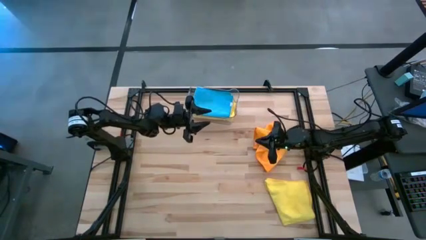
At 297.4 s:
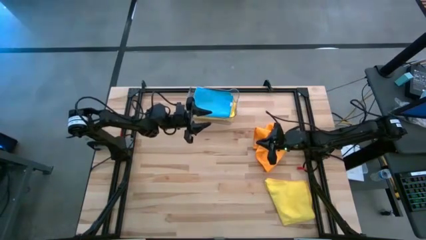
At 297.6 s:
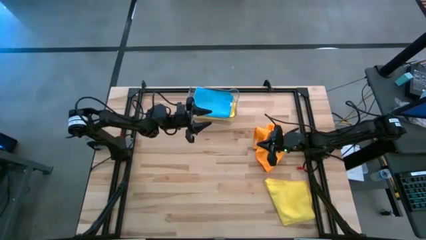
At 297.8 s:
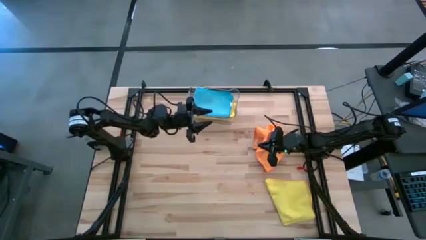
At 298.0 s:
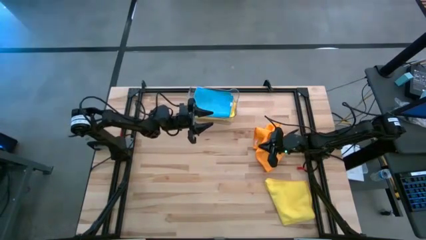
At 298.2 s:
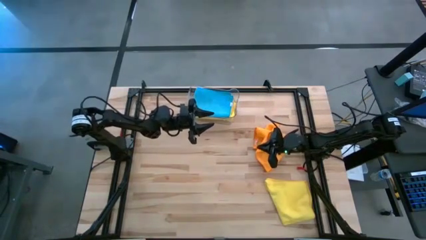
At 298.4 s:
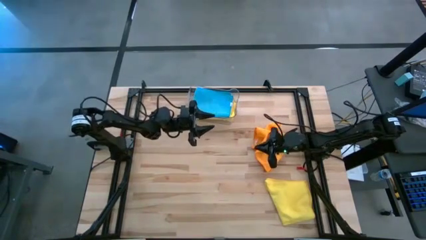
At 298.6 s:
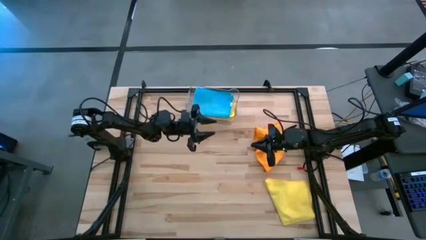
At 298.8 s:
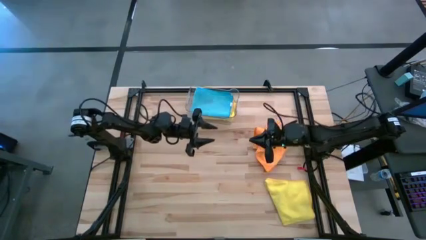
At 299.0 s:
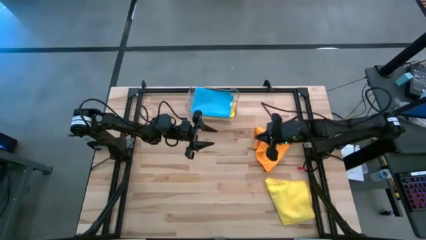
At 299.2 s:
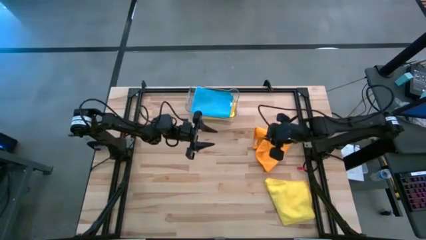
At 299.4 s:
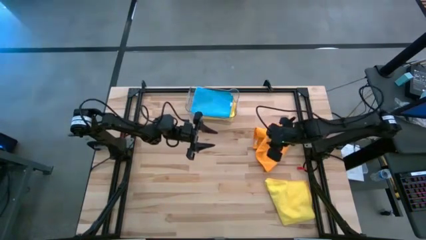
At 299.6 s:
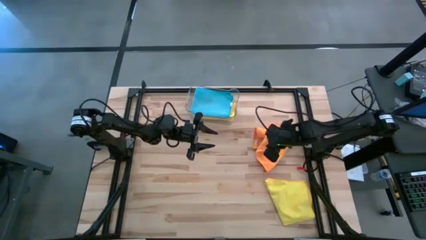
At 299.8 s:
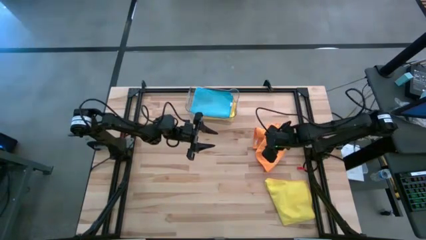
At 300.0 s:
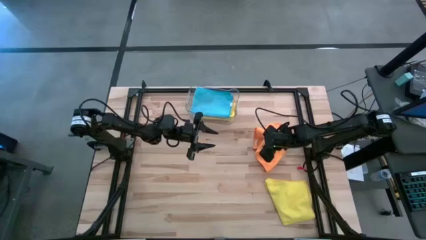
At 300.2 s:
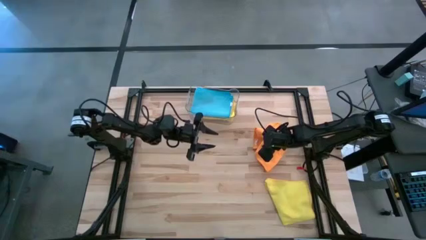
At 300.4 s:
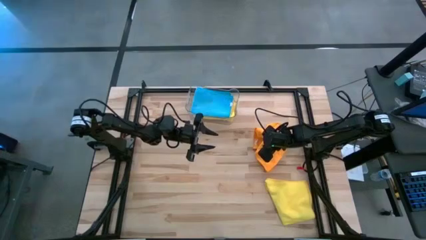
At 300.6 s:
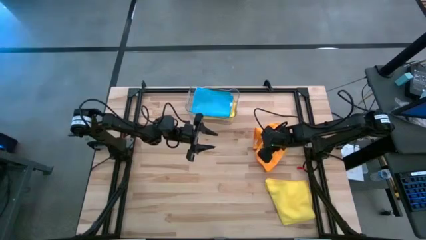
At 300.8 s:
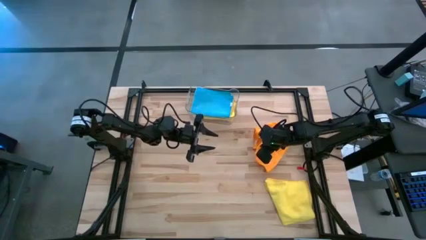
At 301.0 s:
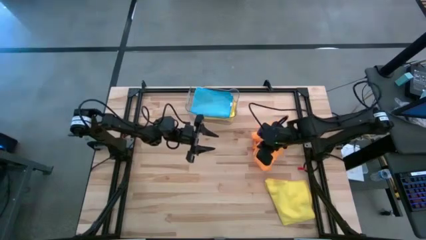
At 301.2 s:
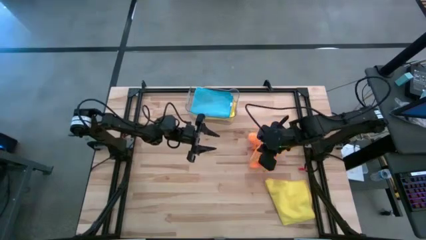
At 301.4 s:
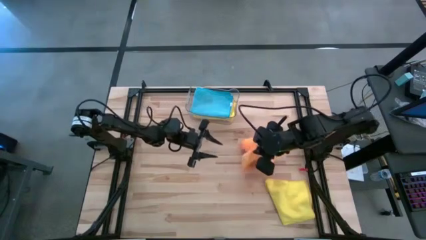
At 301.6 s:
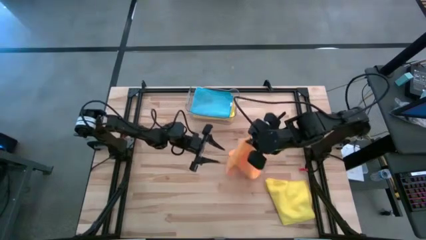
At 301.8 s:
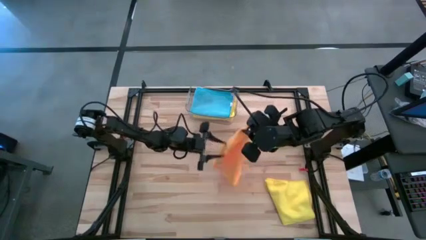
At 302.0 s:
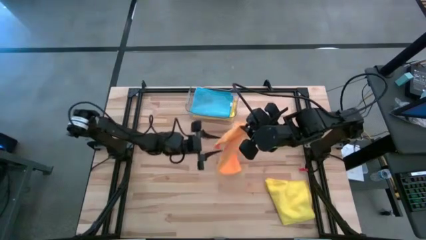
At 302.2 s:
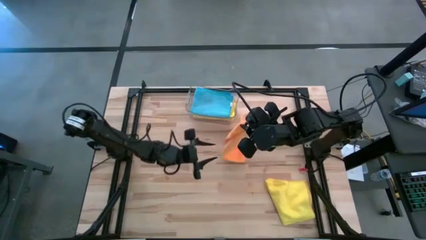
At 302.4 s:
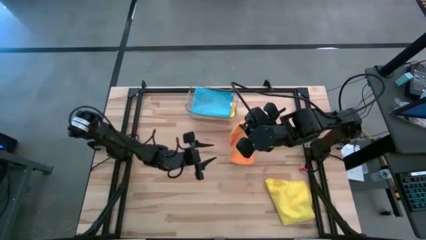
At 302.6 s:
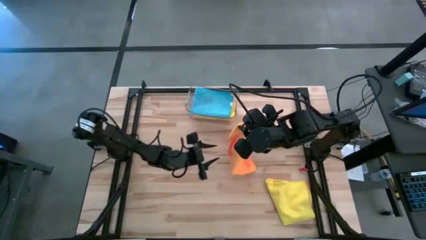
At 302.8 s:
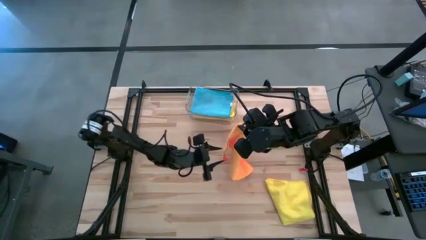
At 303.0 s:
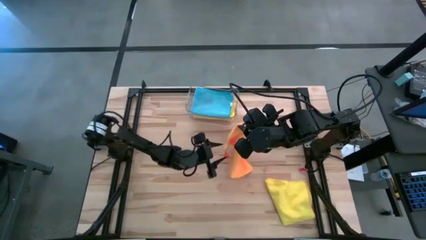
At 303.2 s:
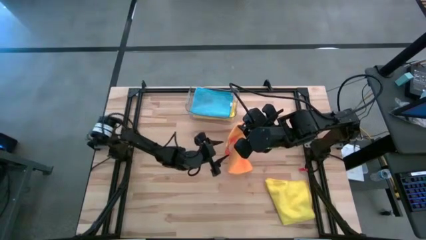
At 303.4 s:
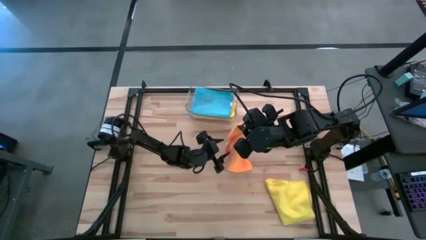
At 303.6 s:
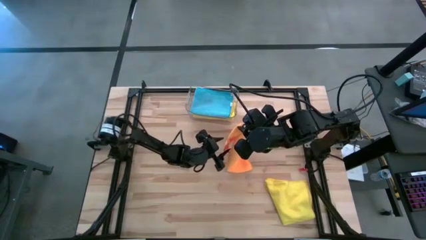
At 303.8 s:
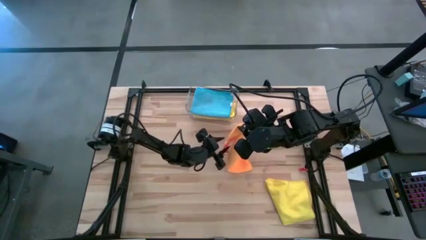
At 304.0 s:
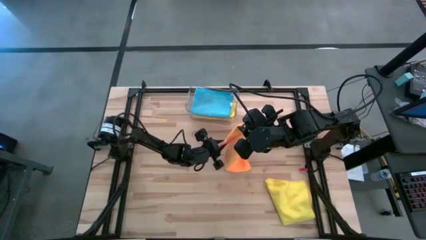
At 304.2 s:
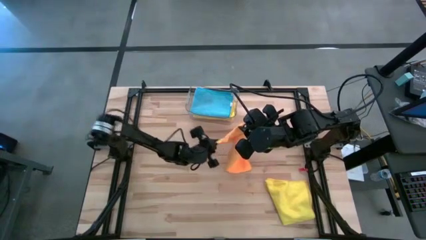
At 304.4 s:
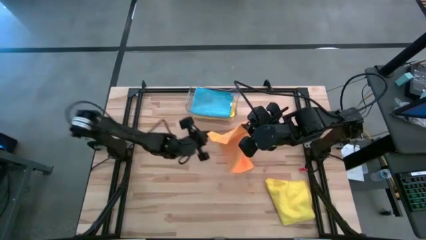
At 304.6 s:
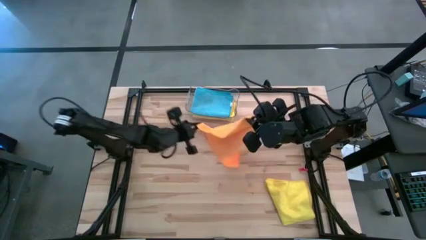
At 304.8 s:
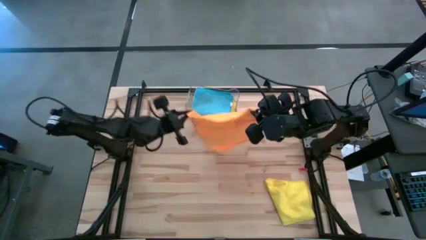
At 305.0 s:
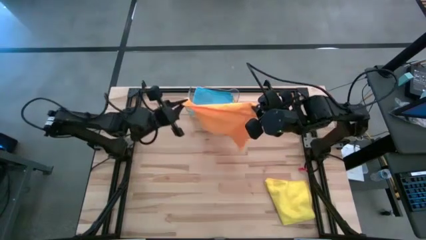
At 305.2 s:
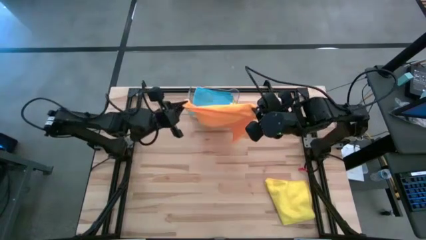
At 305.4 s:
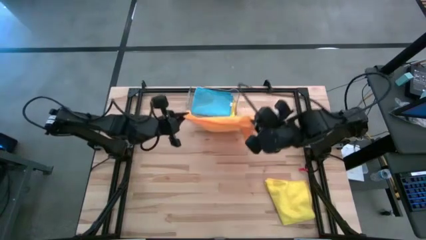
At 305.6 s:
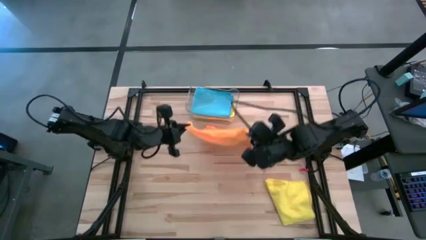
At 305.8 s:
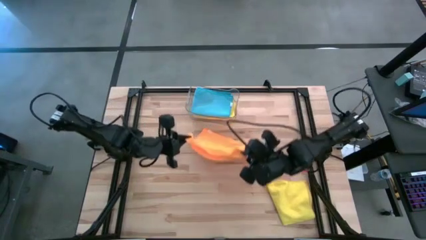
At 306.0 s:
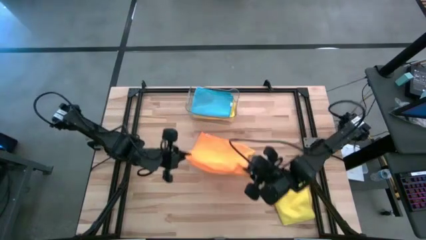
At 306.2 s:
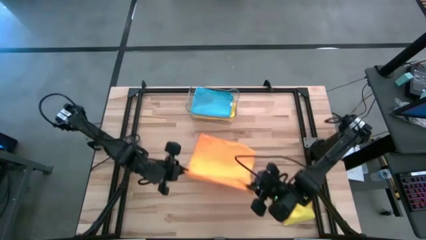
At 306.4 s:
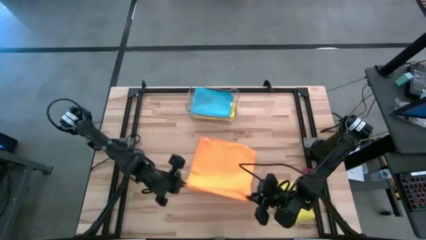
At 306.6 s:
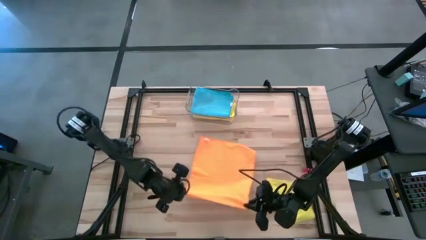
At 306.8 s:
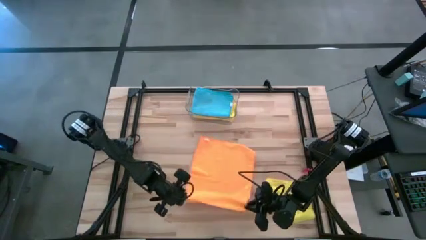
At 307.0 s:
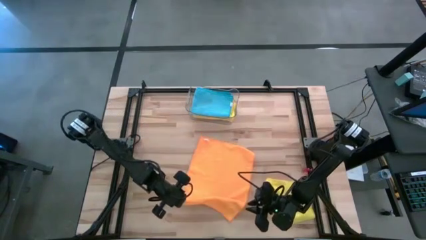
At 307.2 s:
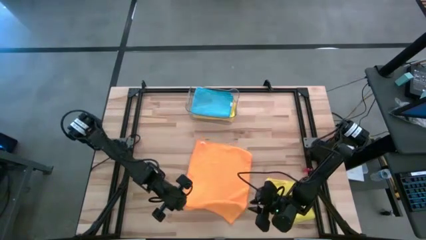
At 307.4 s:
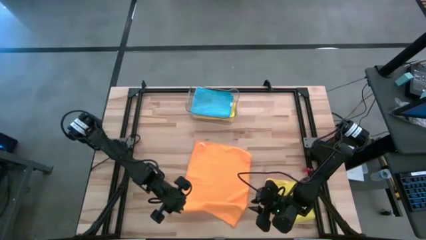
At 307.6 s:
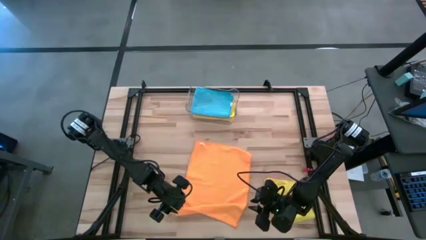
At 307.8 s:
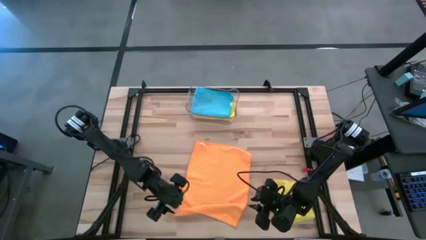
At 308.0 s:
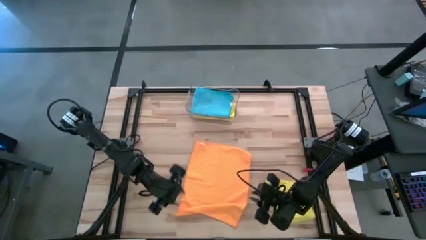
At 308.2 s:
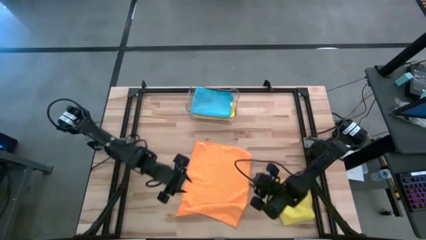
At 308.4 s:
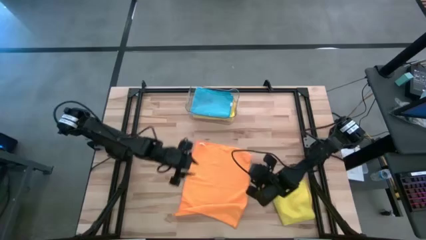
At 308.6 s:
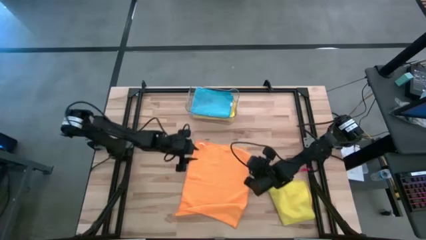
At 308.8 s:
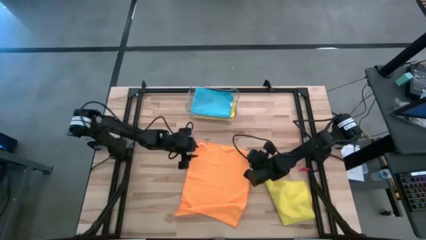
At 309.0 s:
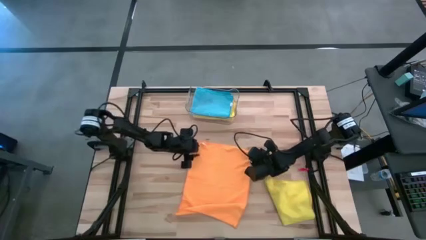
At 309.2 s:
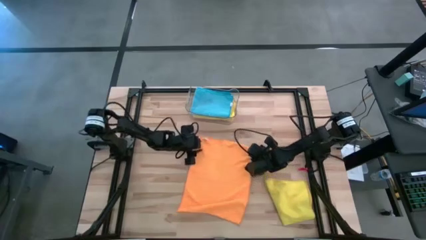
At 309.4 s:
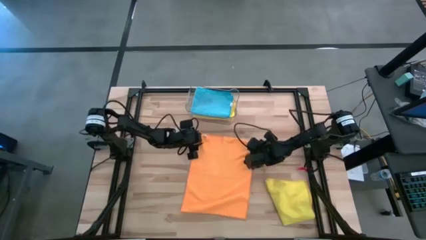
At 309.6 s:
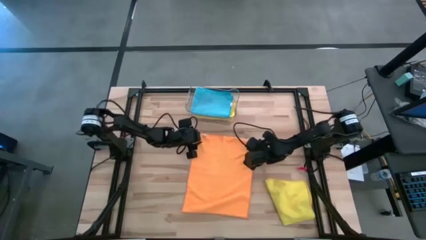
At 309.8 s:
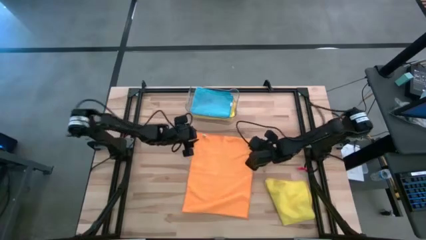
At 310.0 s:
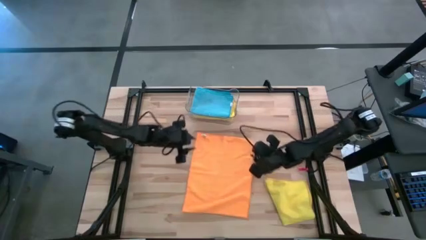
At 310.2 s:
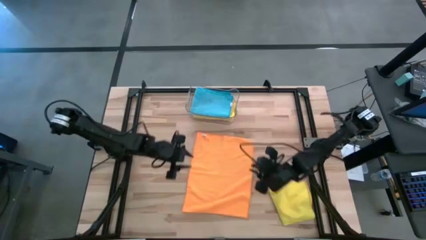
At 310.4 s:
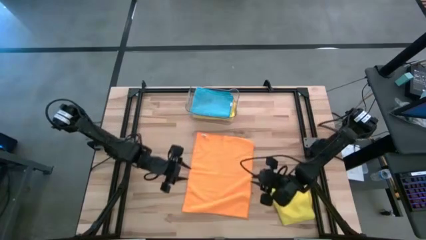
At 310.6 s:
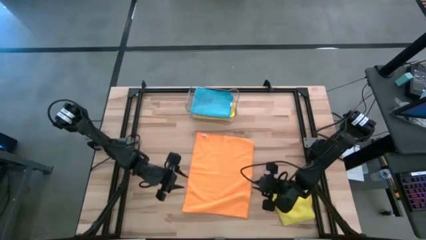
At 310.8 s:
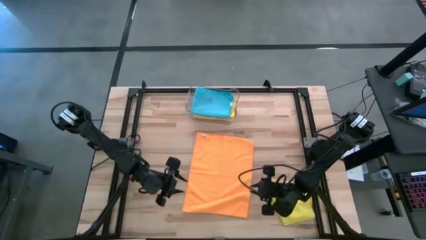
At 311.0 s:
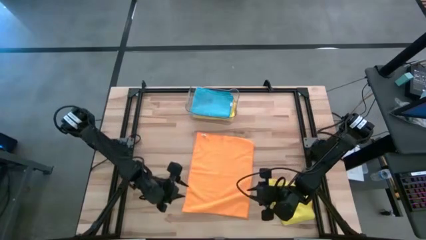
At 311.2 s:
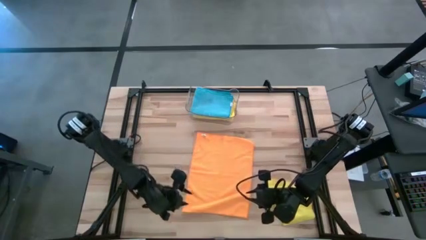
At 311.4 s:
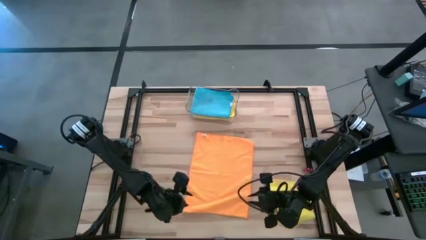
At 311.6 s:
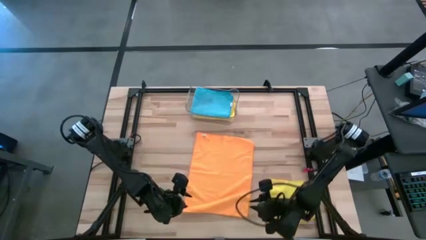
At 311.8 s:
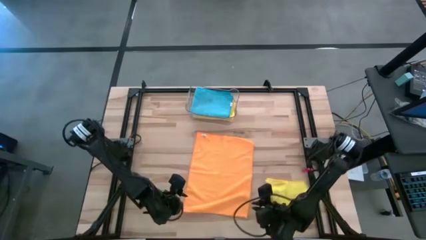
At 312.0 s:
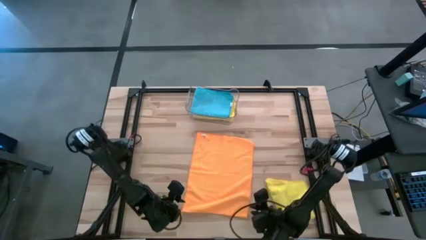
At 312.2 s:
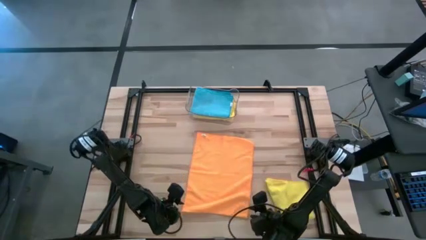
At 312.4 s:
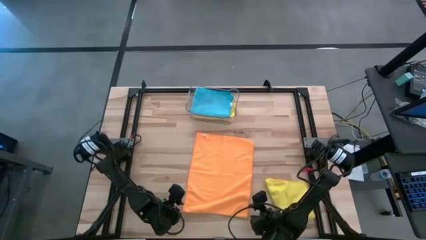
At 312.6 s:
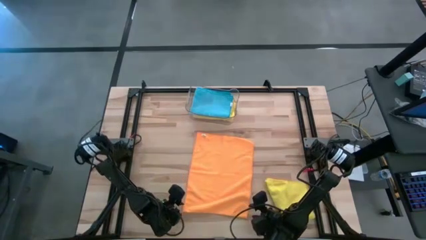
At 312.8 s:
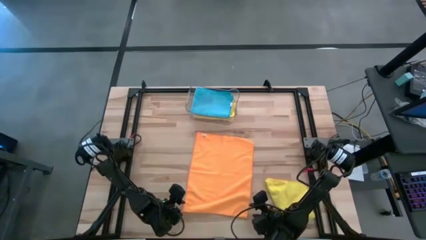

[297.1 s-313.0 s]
Task: Fold microfiber towels
Fold the orange microfiber cloth
